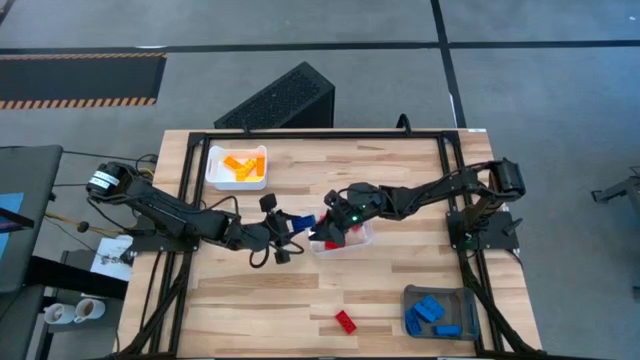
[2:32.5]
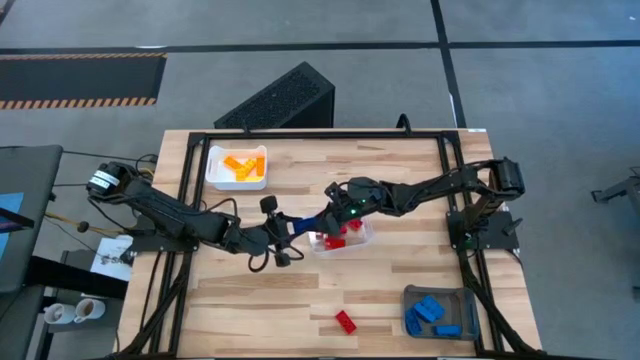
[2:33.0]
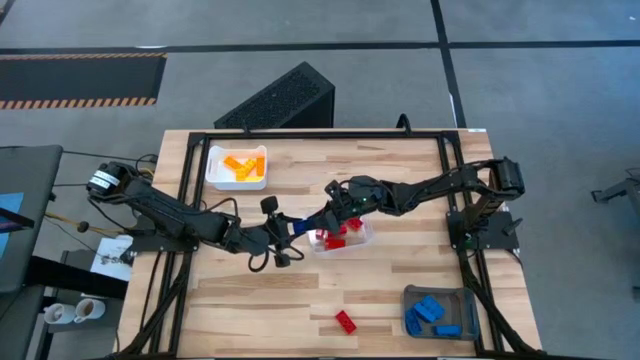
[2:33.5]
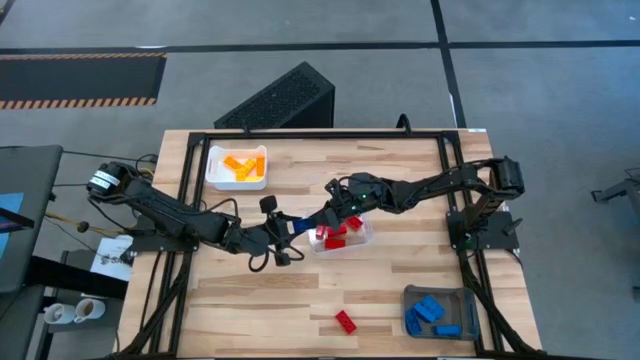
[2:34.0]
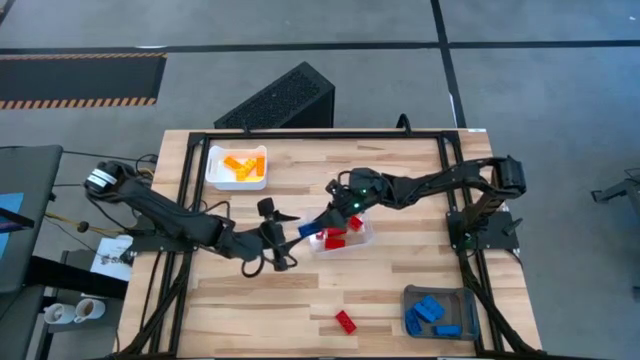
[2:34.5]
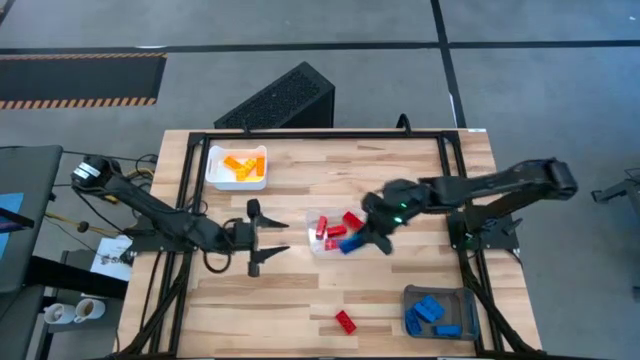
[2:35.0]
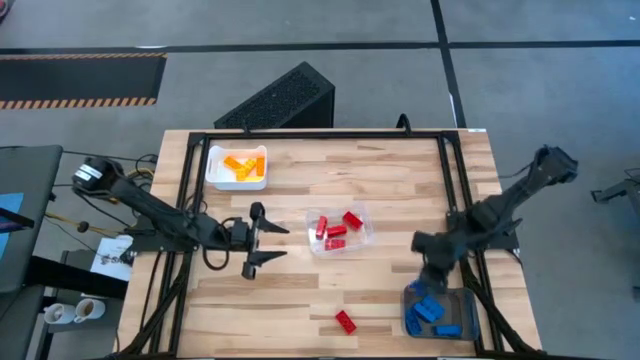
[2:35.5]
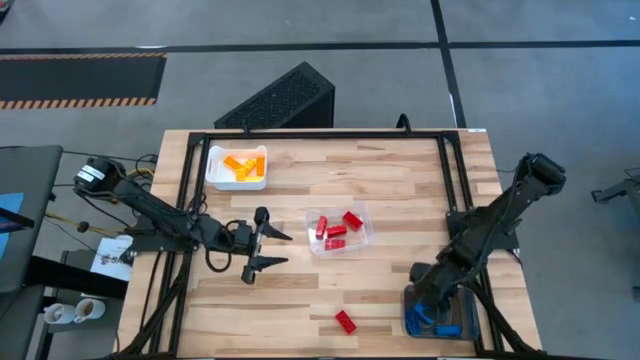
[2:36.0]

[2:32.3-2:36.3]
Task: Sort & place blocks by color
Put the blue game piece into the black bin

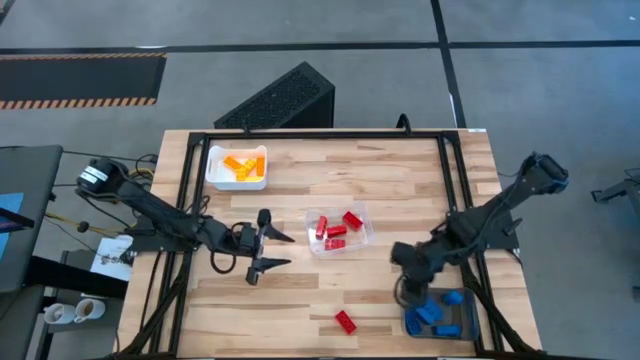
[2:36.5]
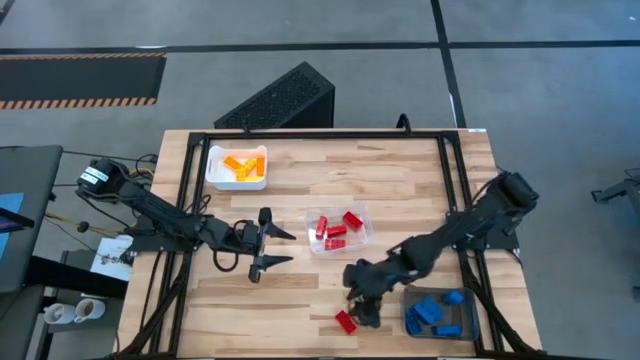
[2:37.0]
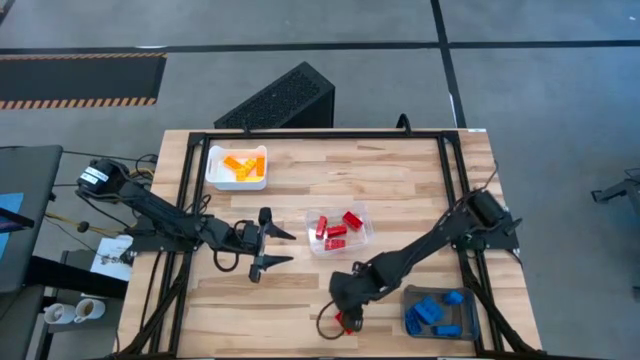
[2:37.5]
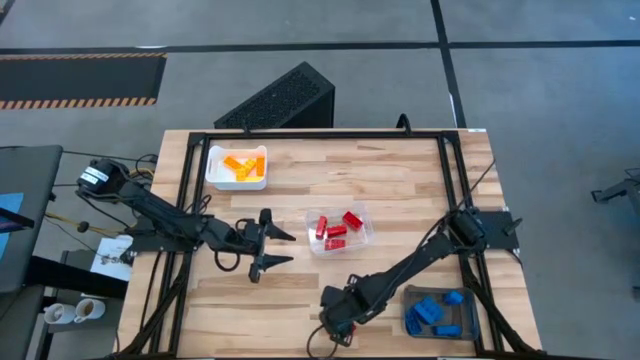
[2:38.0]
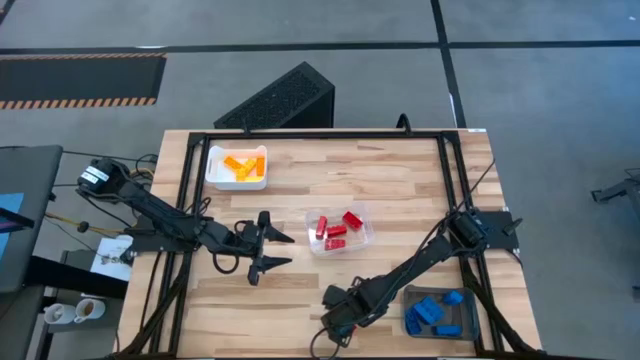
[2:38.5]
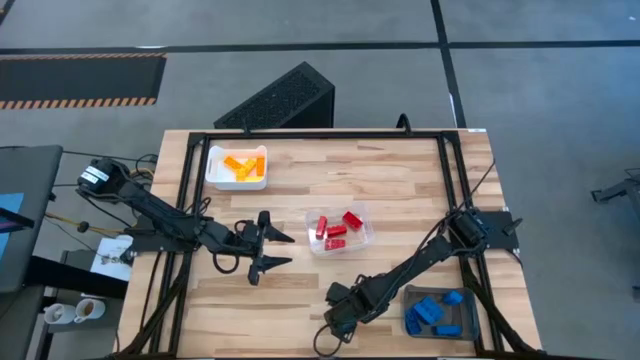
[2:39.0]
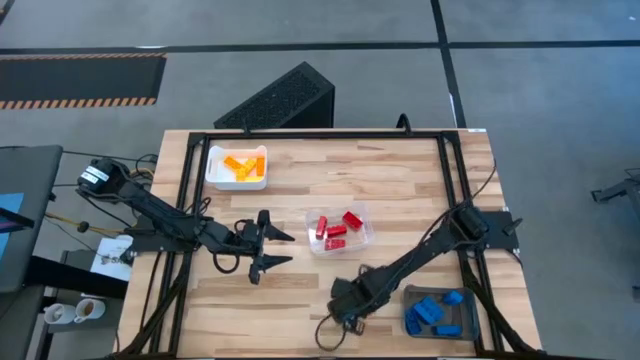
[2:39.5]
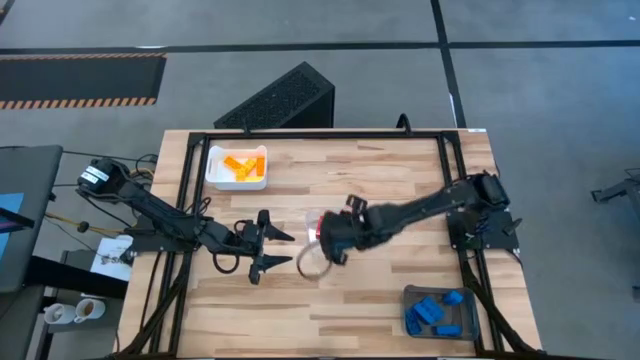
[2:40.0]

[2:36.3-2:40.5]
Put the red game piece into the transparent bin

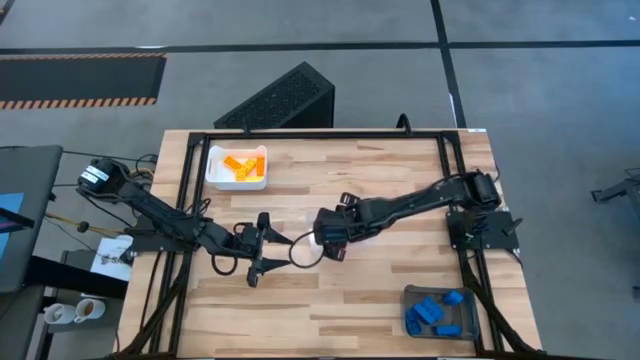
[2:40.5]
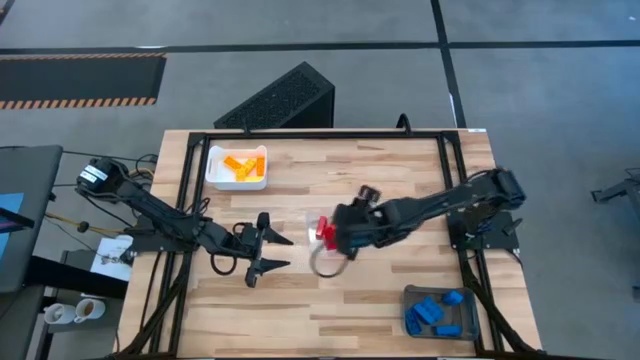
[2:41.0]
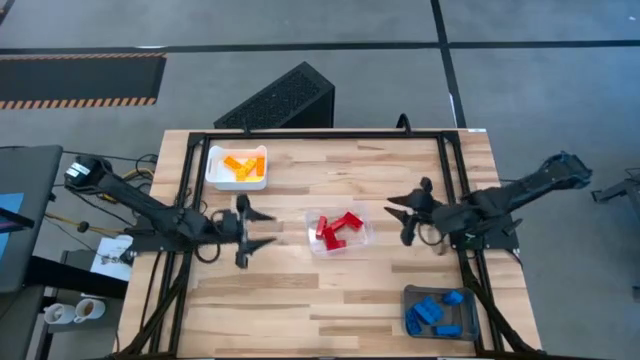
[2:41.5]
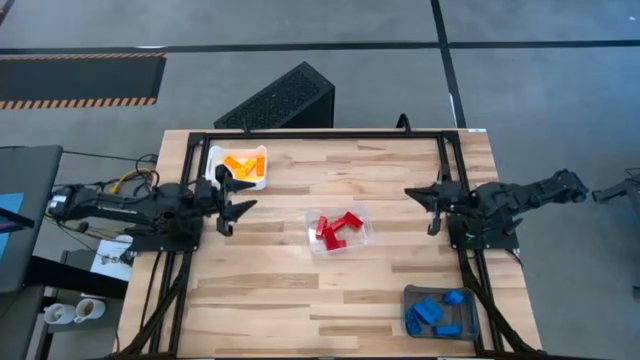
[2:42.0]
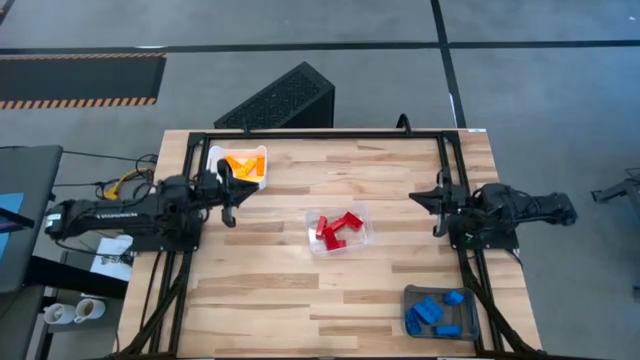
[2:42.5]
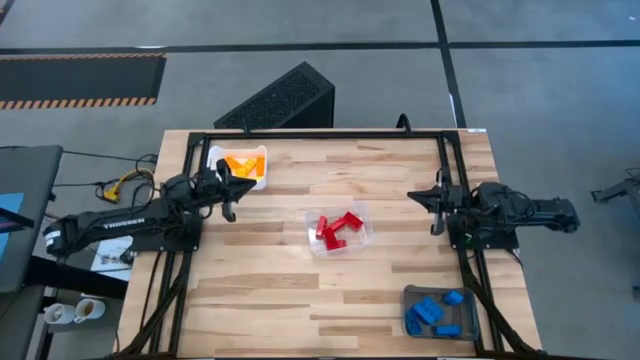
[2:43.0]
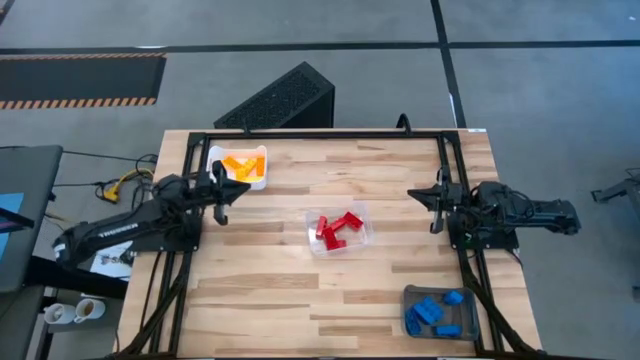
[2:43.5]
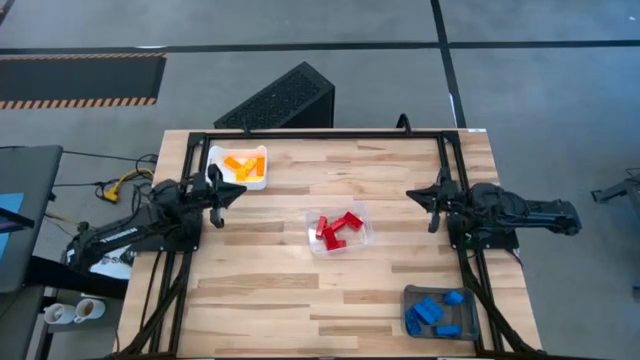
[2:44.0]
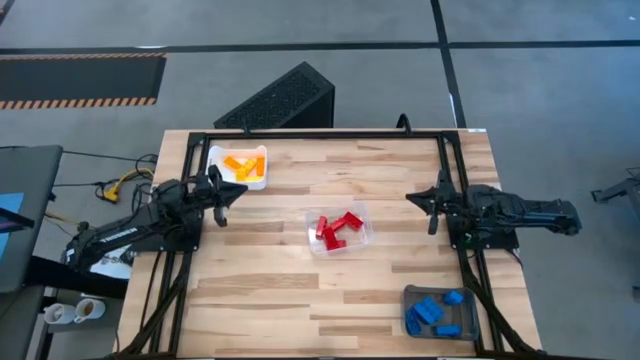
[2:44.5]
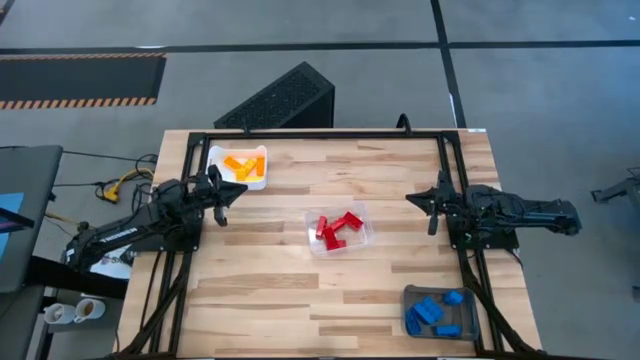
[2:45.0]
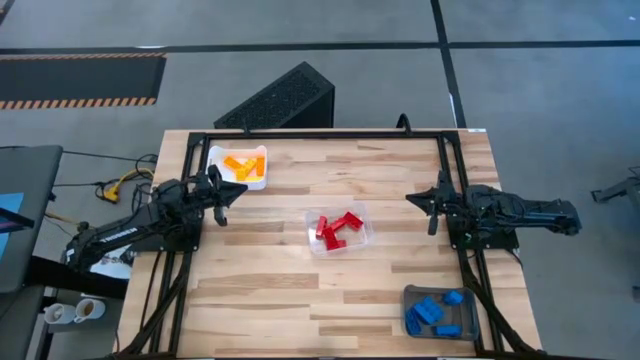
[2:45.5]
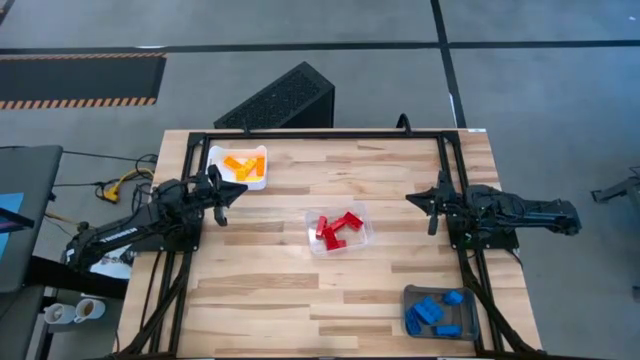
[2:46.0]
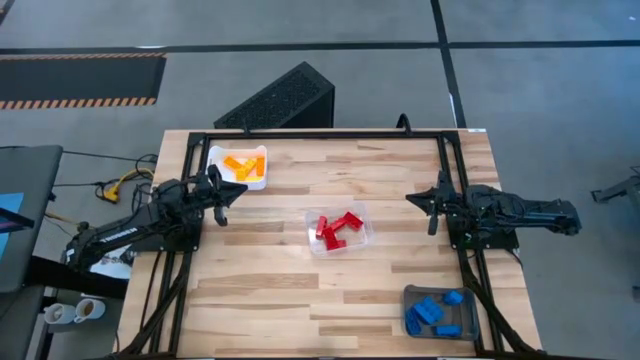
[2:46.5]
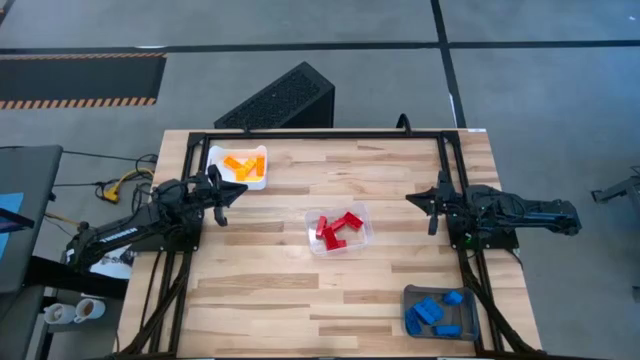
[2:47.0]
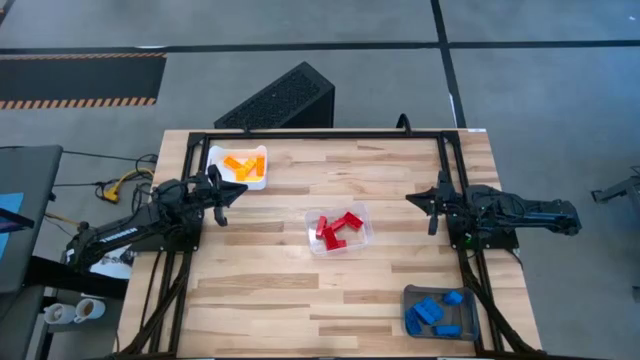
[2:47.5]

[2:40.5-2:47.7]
Return to Home Position

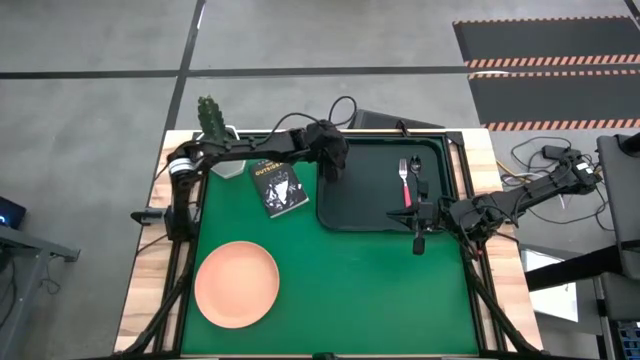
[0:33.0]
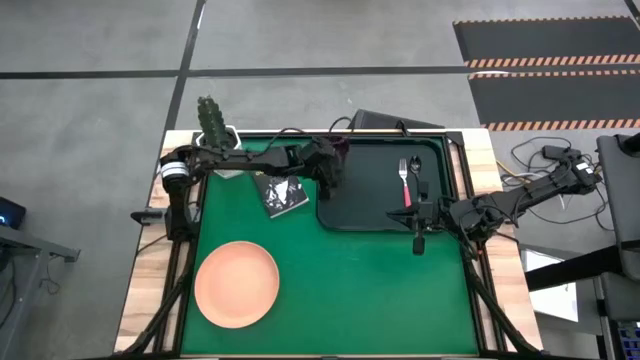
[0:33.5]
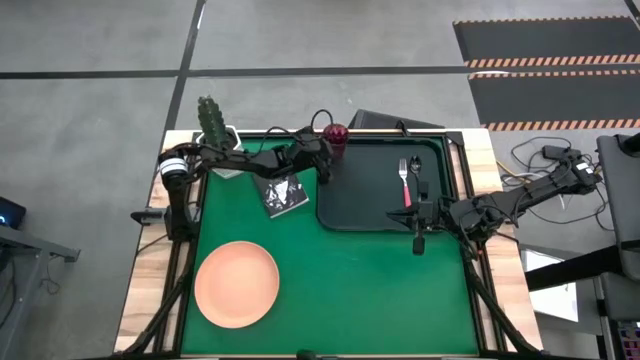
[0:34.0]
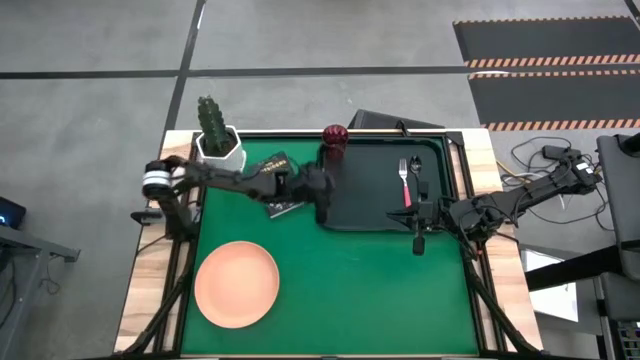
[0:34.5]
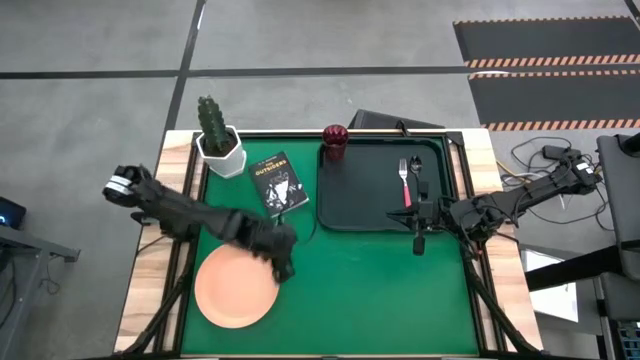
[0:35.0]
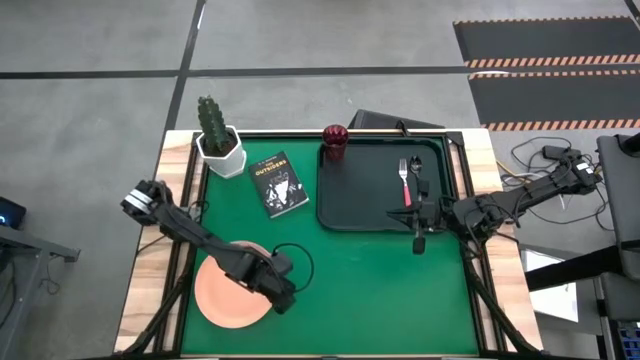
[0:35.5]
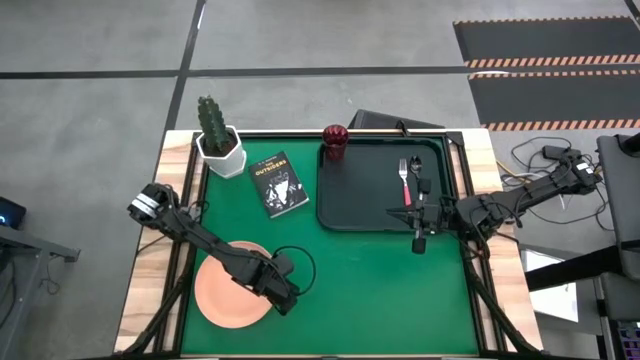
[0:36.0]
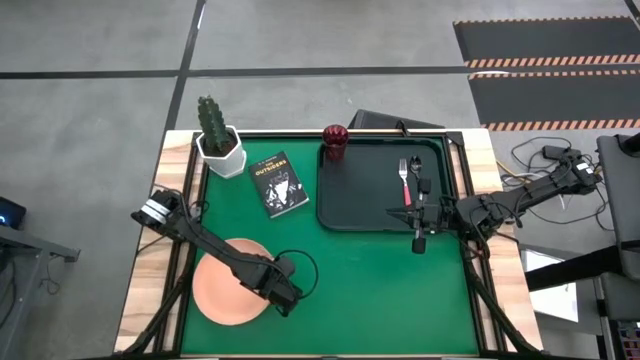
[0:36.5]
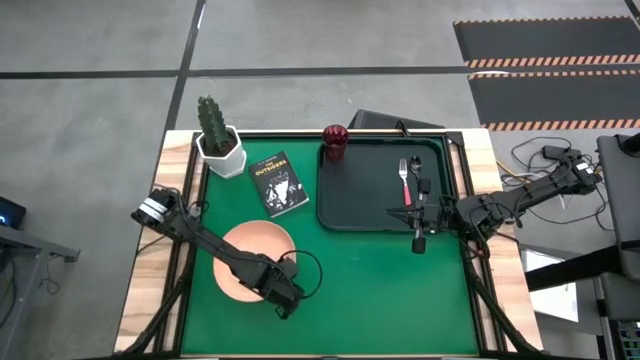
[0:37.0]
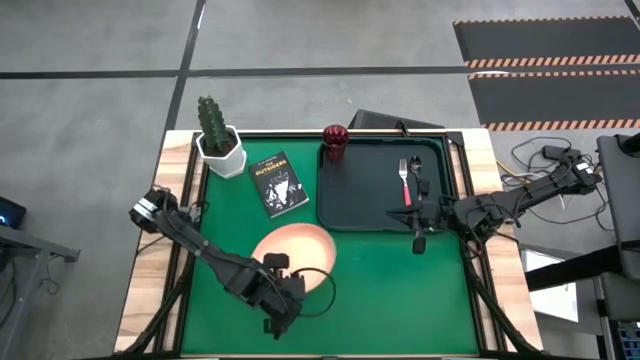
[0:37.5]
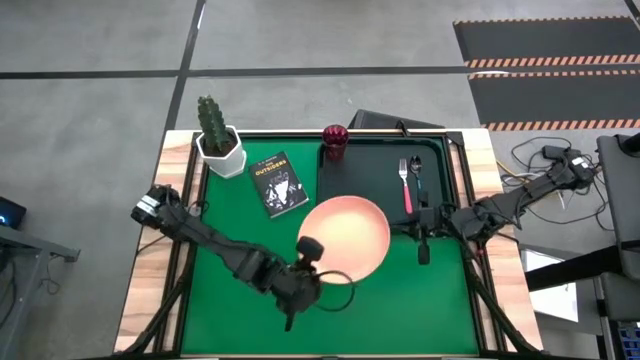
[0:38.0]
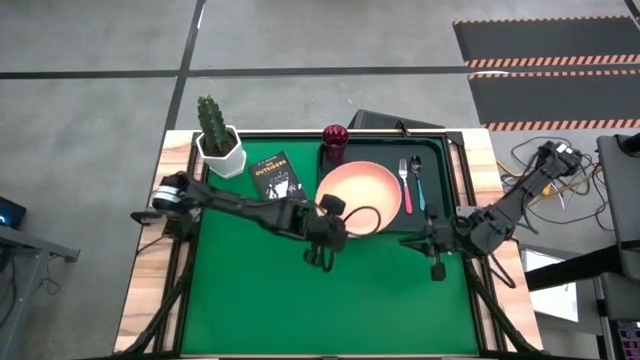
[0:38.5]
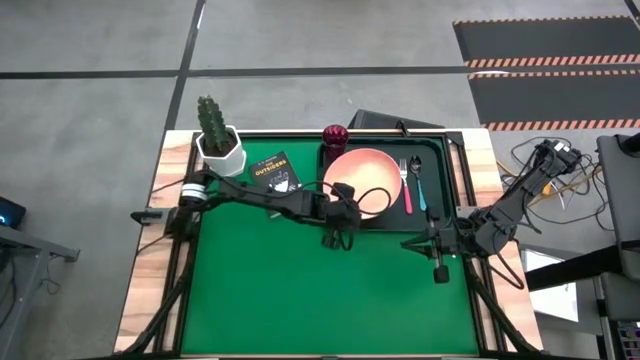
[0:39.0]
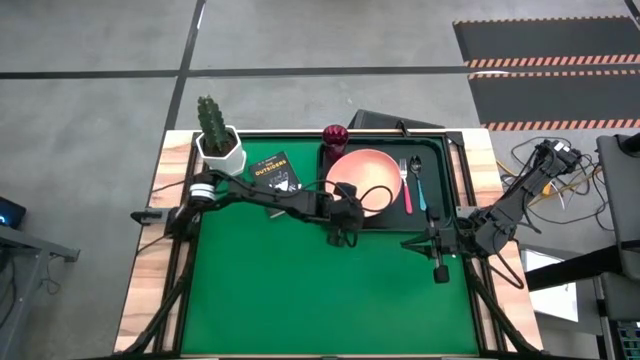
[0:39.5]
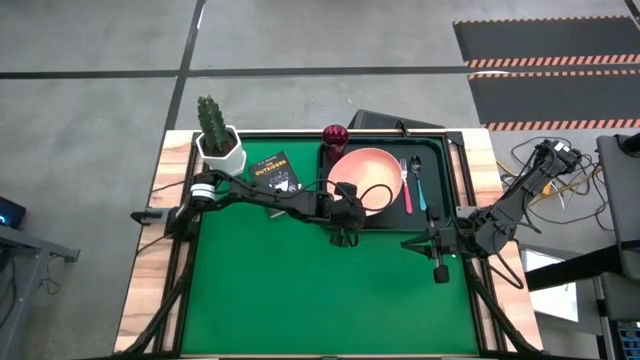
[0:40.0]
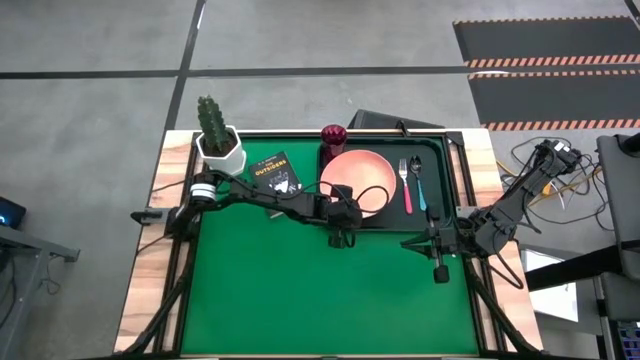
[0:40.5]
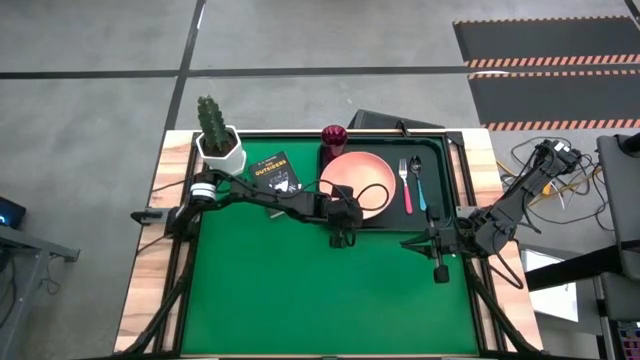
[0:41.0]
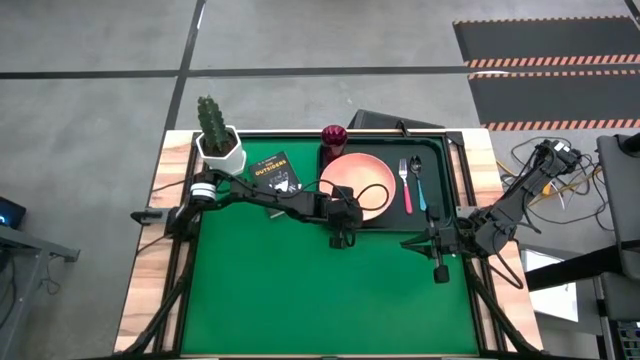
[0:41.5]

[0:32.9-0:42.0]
Task: Pick and place plate/cup/fork/spoon on tray
Put the orange plate on the black serving tray to the bottom of the red glass
